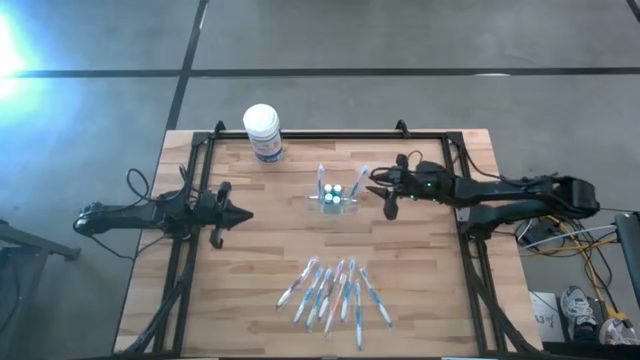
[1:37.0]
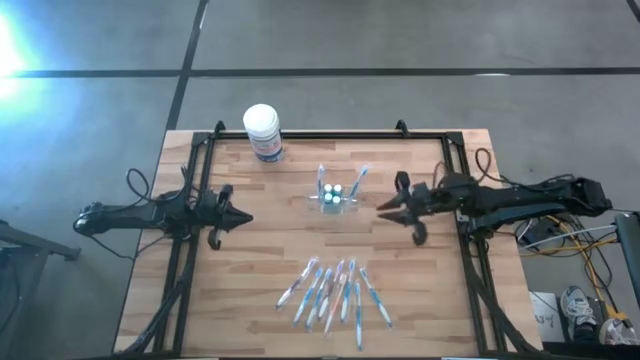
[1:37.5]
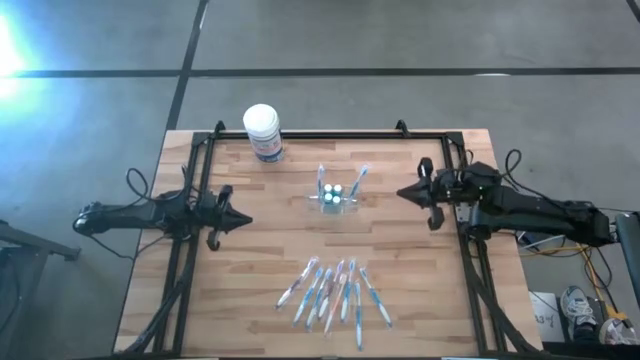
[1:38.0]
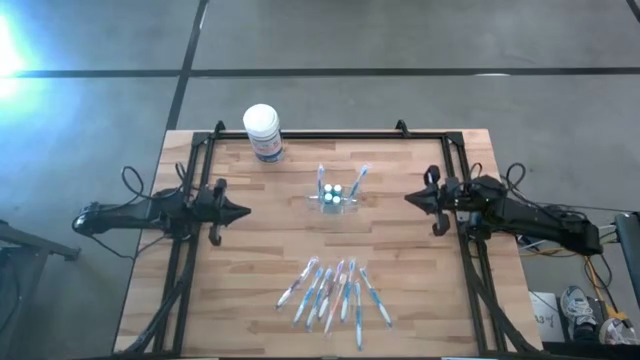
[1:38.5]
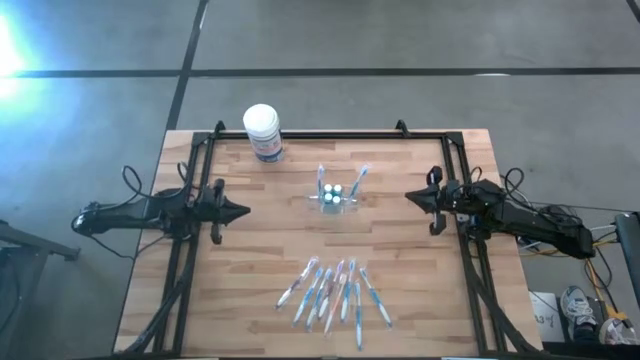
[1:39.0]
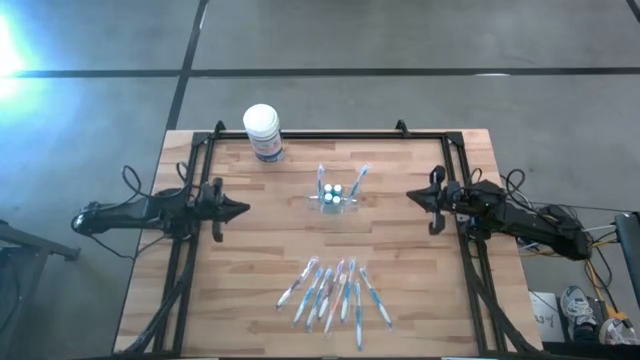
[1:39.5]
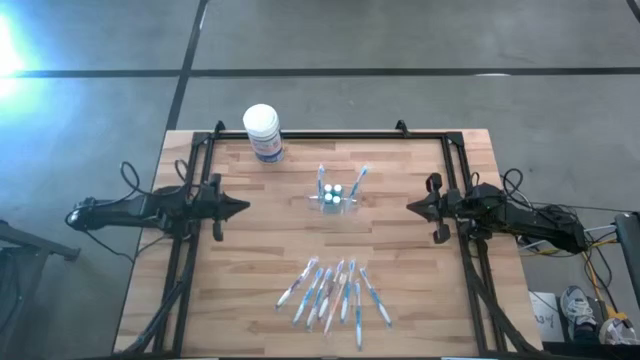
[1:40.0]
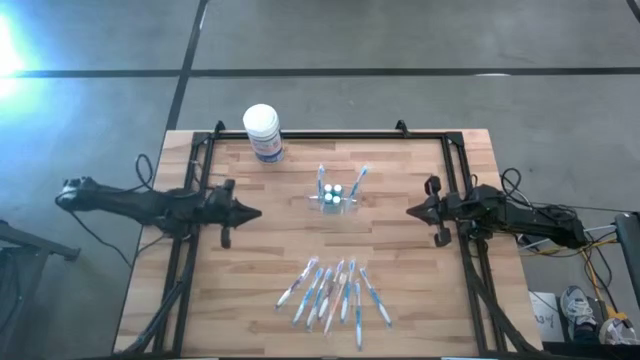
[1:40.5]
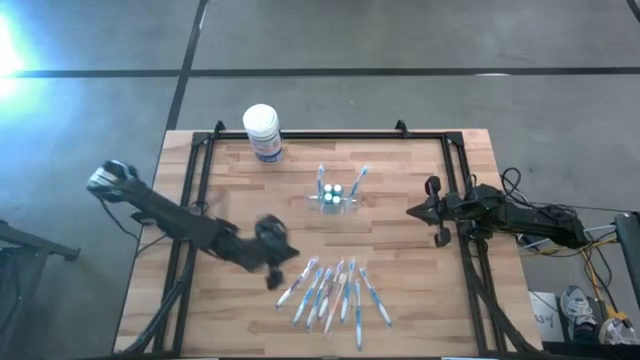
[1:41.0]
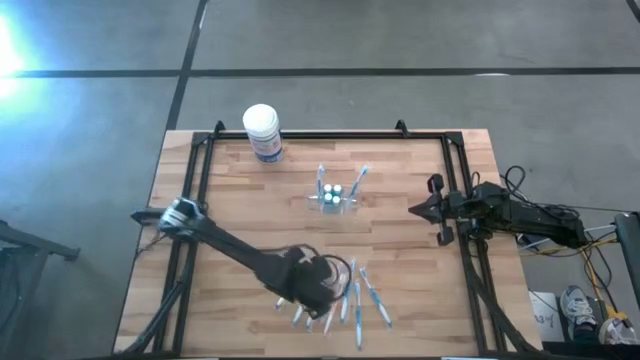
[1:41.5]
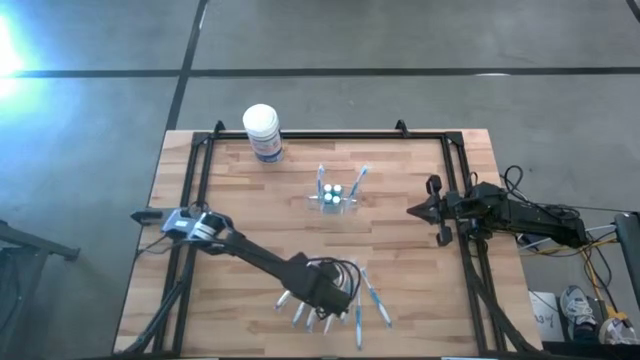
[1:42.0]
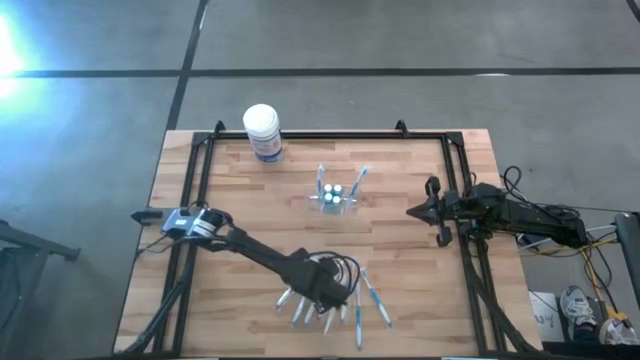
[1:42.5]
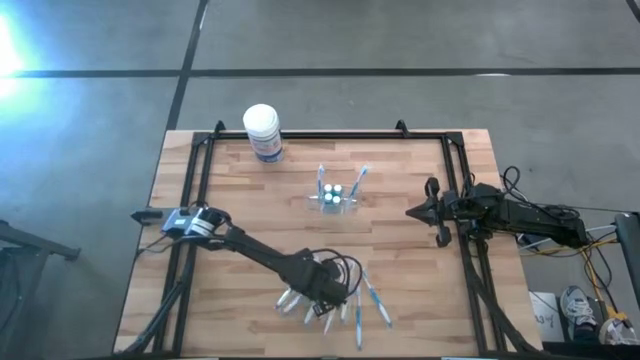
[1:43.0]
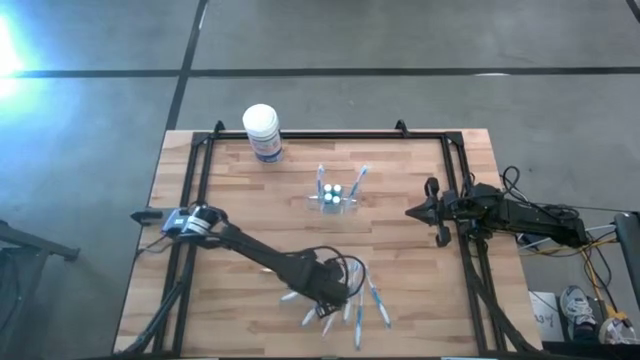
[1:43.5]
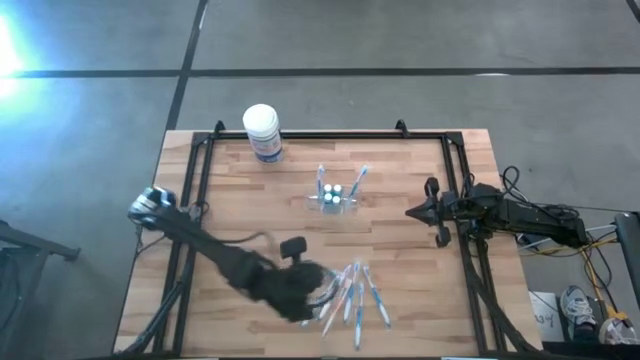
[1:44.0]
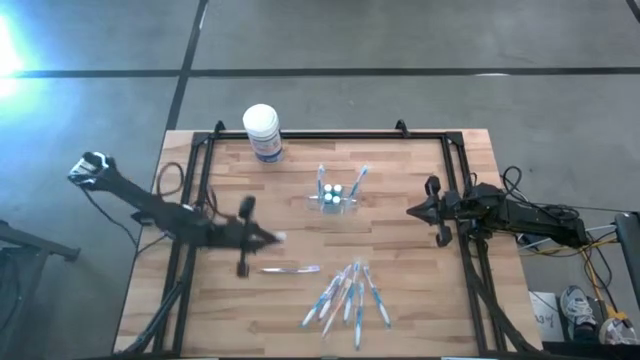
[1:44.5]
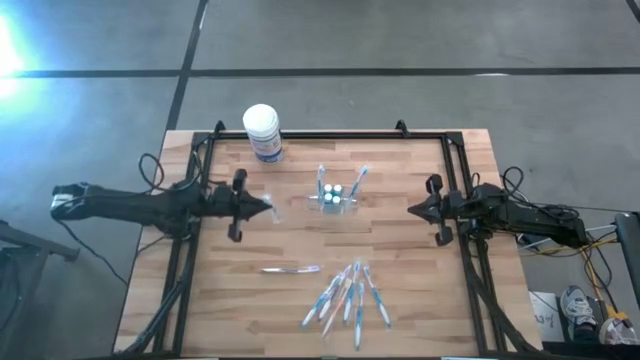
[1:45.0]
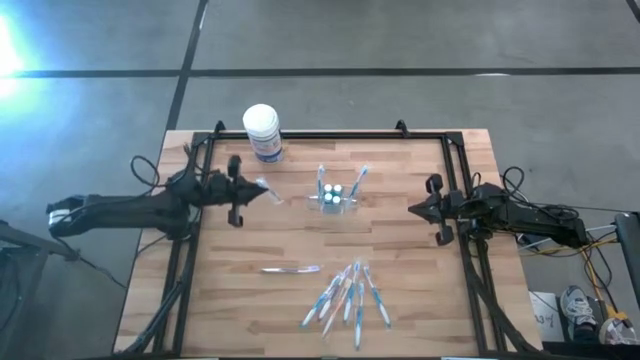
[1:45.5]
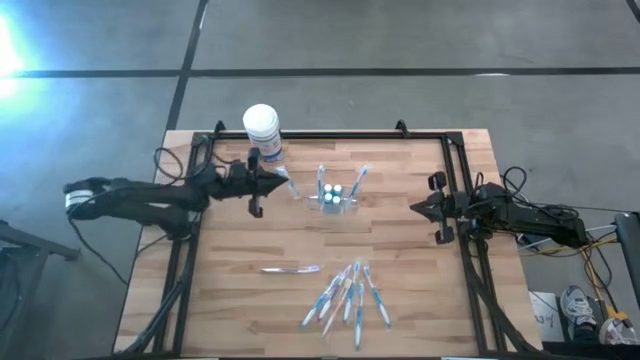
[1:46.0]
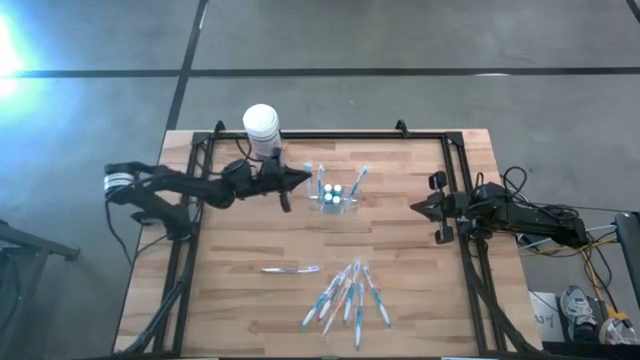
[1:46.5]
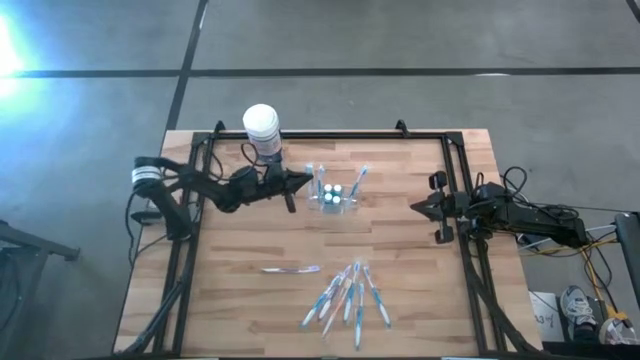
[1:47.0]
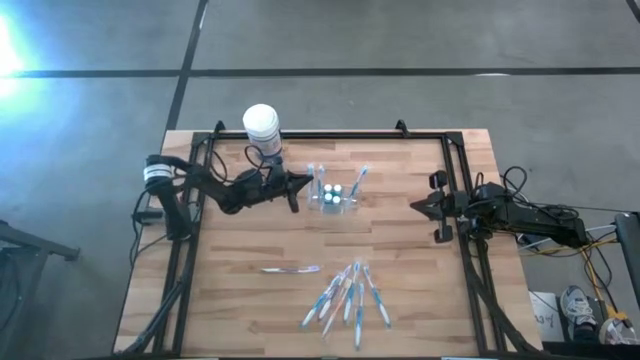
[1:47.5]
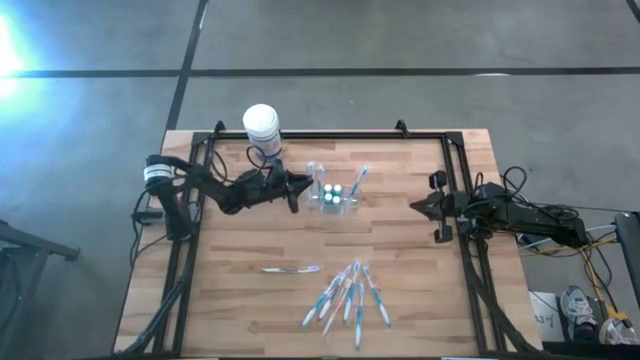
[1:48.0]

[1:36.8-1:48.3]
Task: Pick & Place toothbrushing station
Put the blue toothbrush into the transparent bin organizer

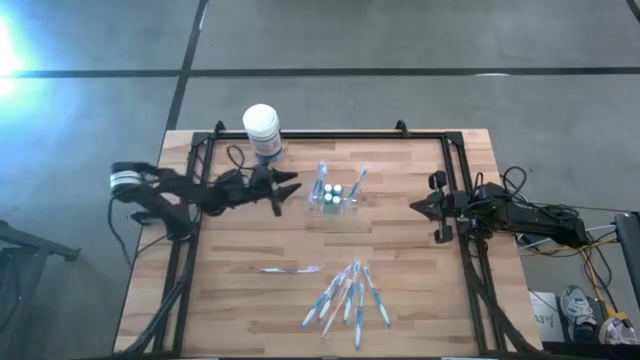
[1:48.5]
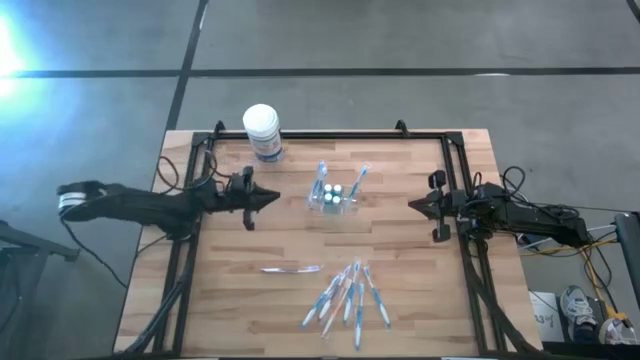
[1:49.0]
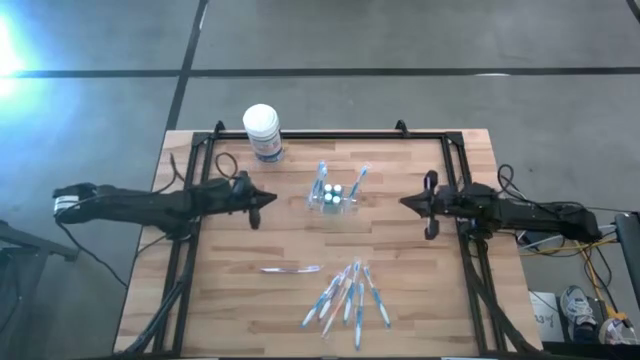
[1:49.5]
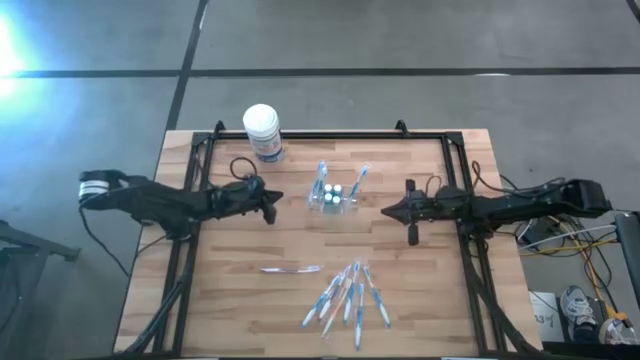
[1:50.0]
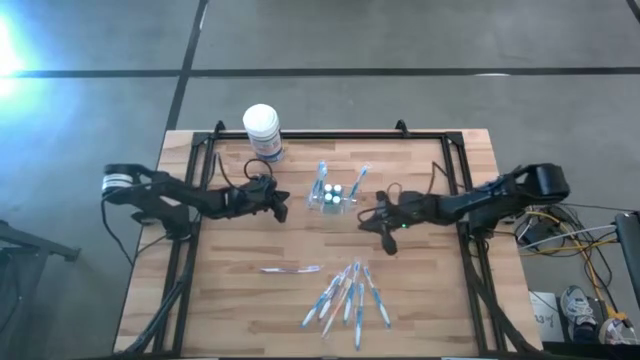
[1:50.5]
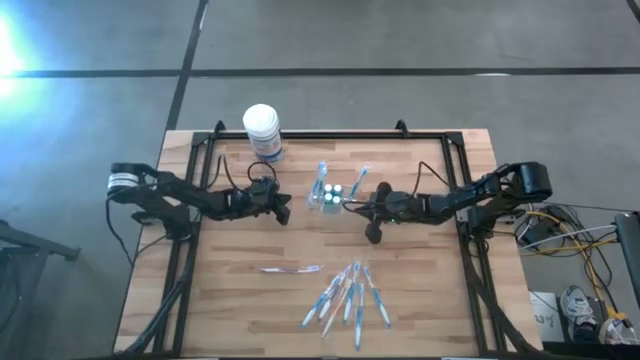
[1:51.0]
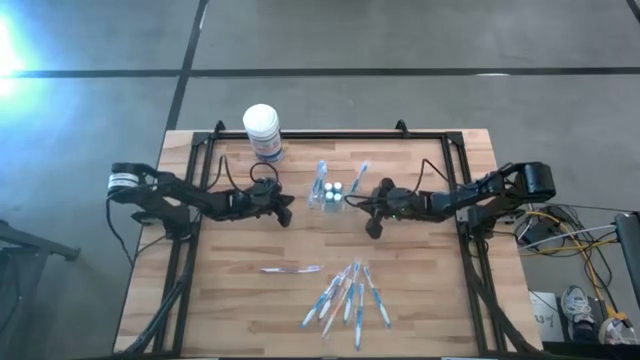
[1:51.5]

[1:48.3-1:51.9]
Adjust the transparent bin organizer

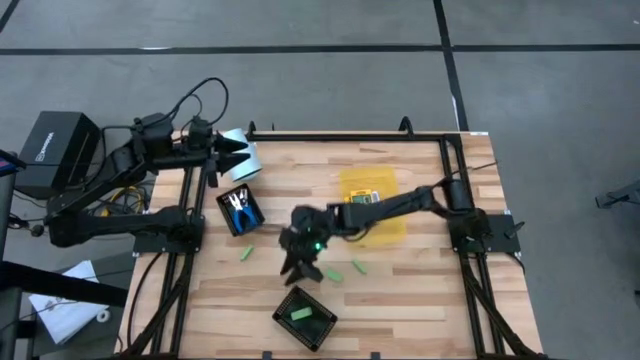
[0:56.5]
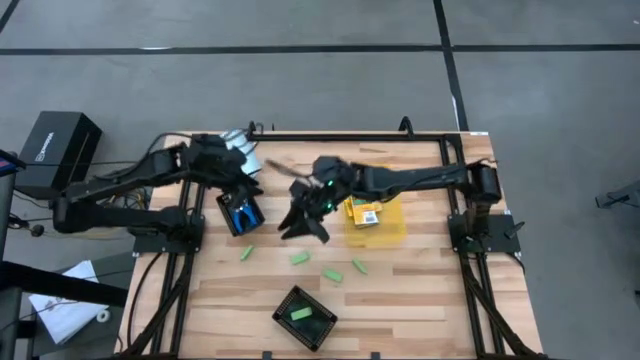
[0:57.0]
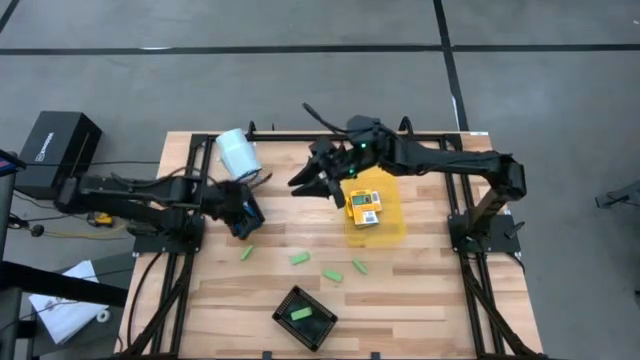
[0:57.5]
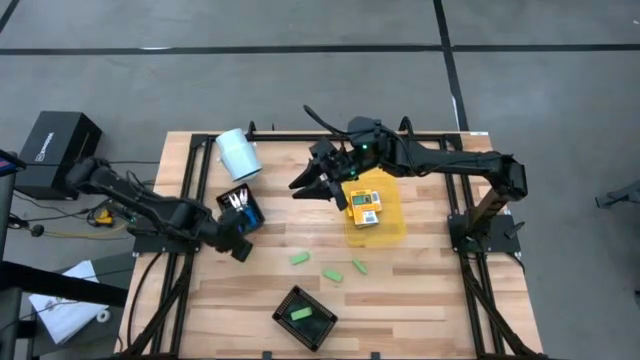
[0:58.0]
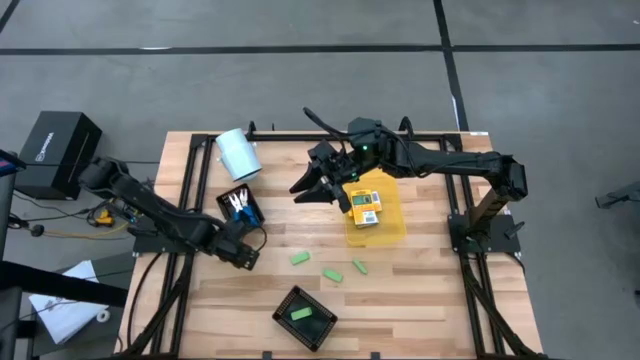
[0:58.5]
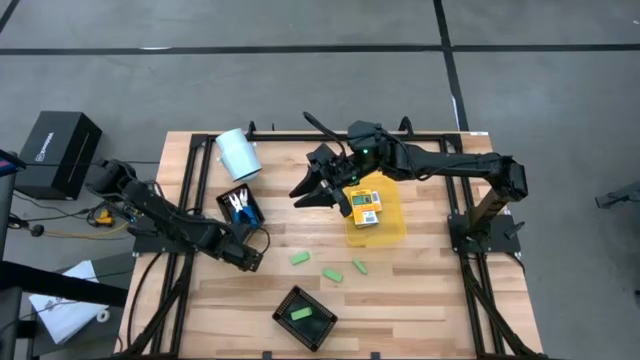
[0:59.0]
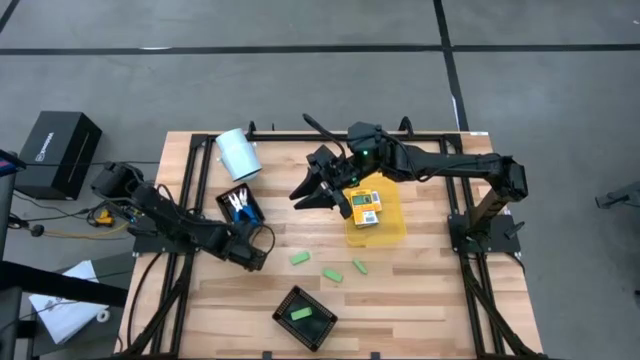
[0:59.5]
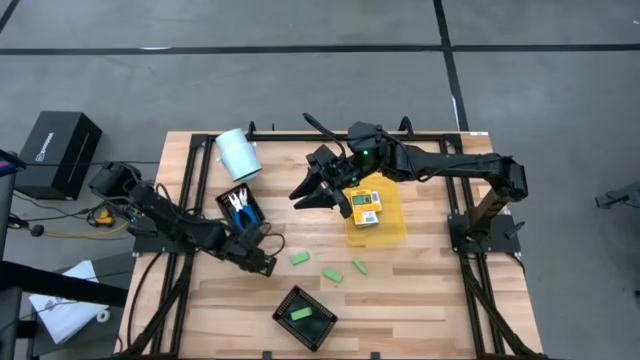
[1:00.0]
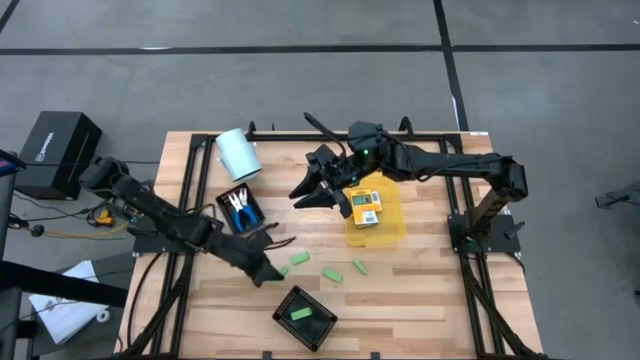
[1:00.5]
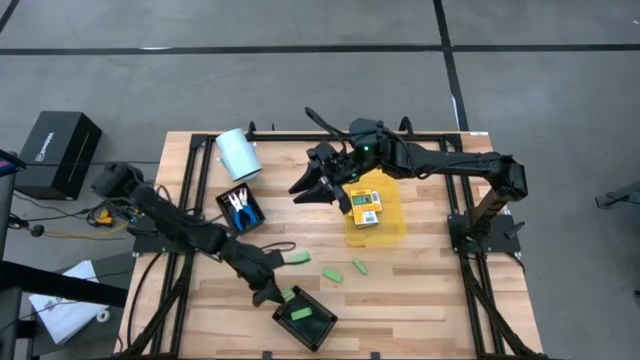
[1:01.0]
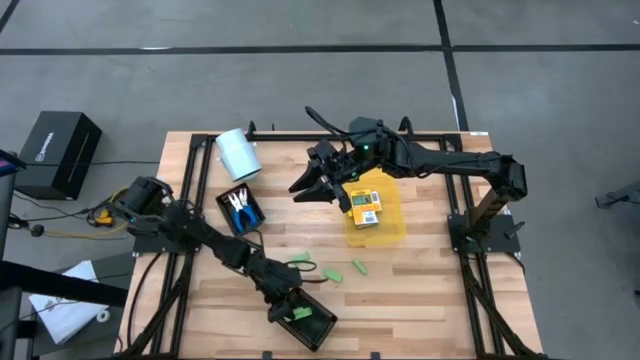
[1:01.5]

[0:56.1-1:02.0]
Task: Pick & Place School Supplies
Put the green eraser into the bottom black bin
